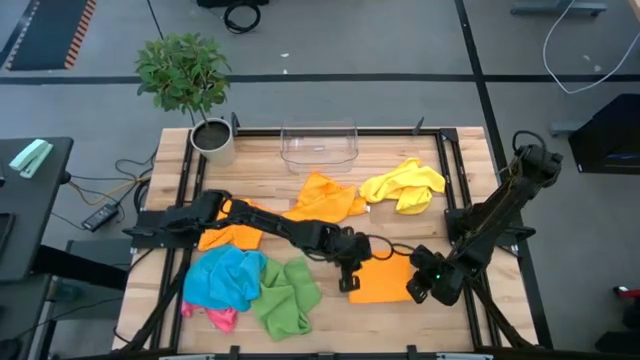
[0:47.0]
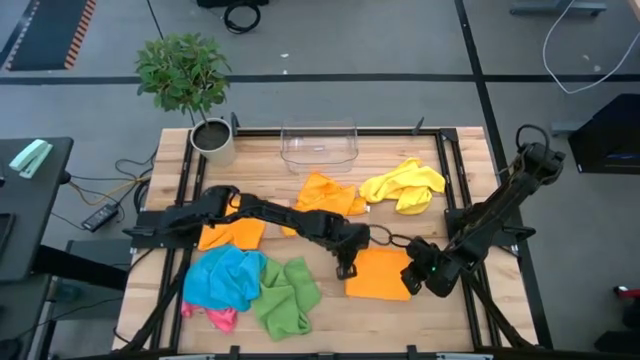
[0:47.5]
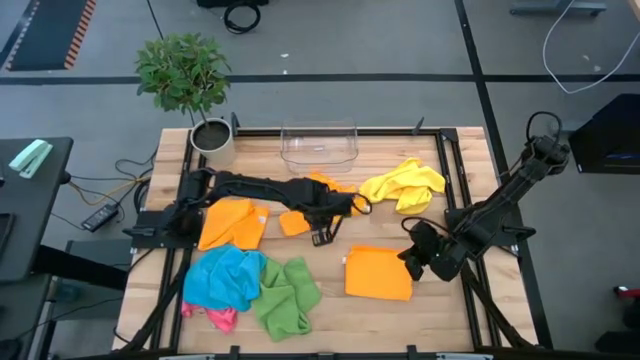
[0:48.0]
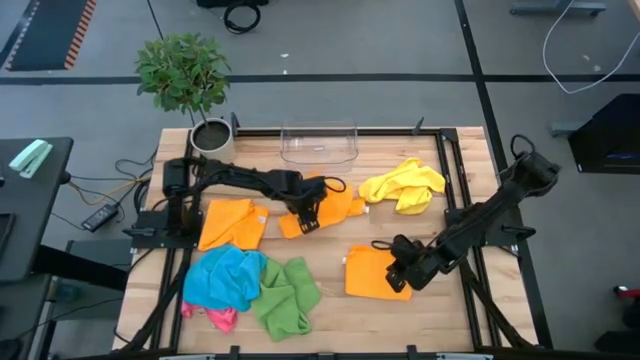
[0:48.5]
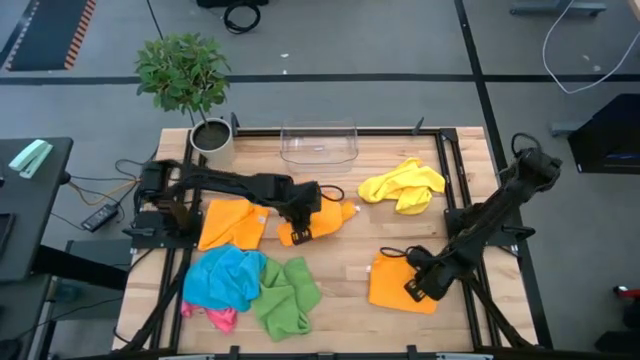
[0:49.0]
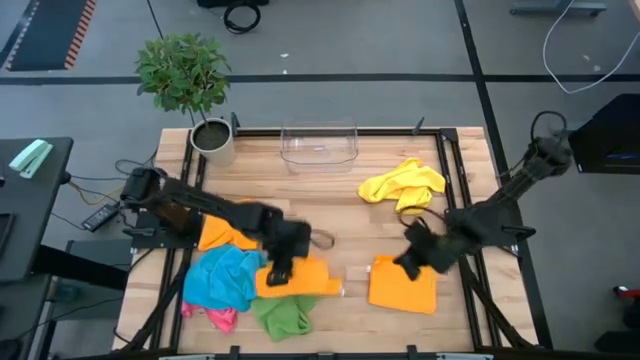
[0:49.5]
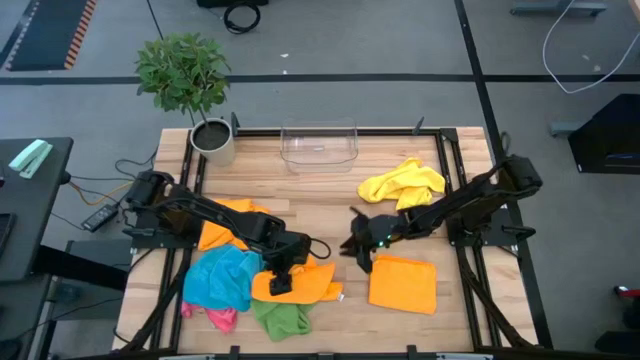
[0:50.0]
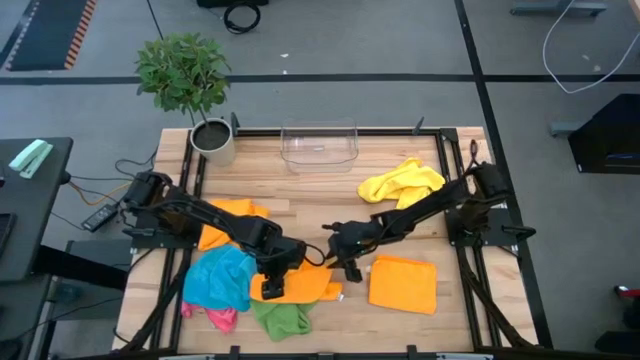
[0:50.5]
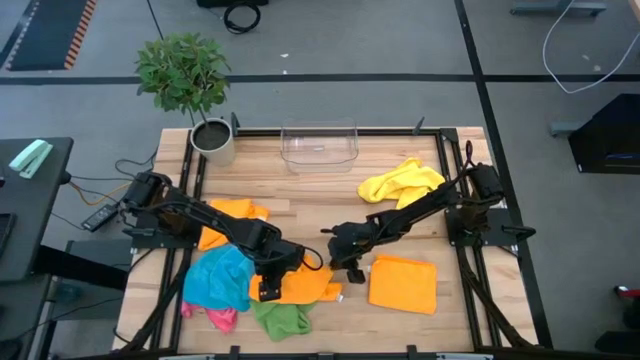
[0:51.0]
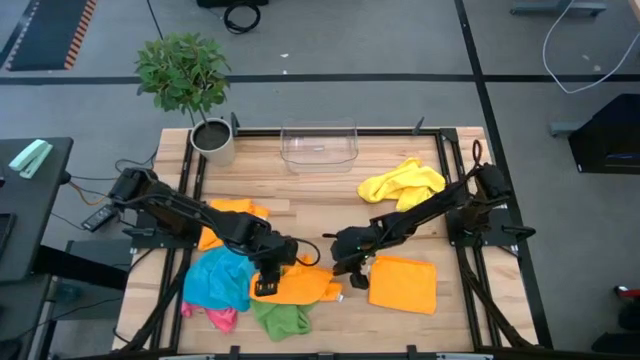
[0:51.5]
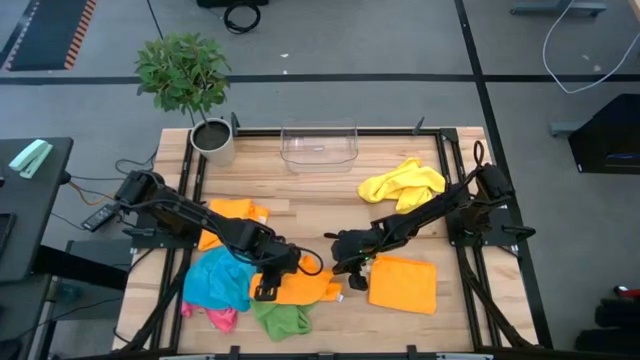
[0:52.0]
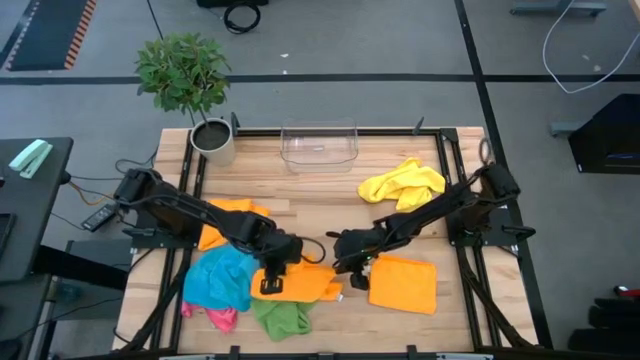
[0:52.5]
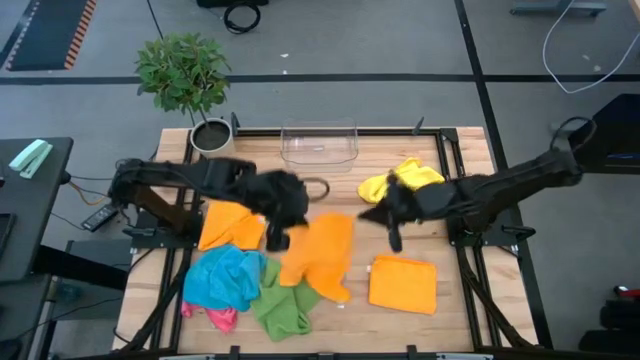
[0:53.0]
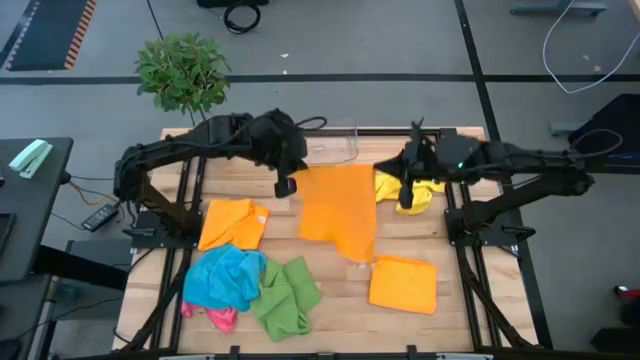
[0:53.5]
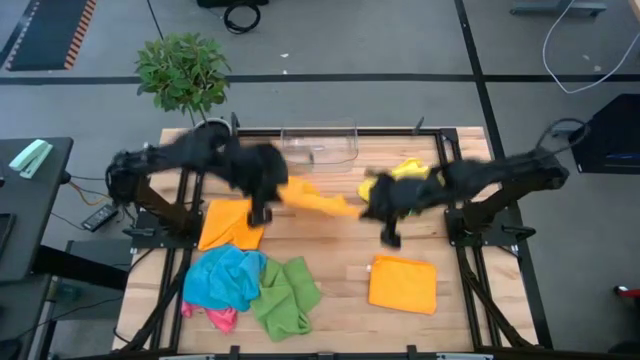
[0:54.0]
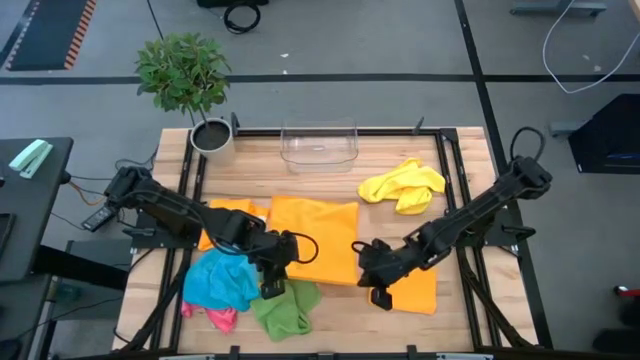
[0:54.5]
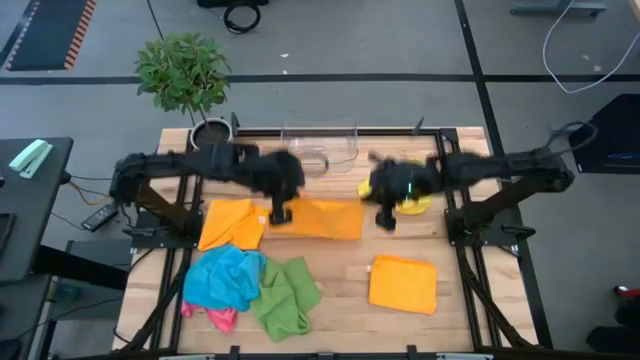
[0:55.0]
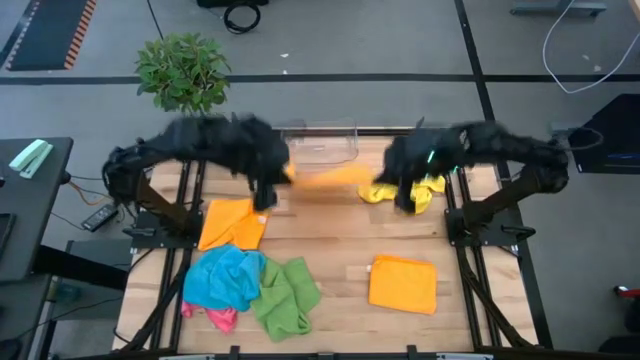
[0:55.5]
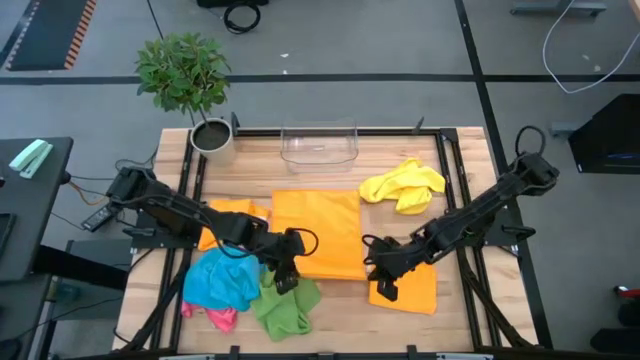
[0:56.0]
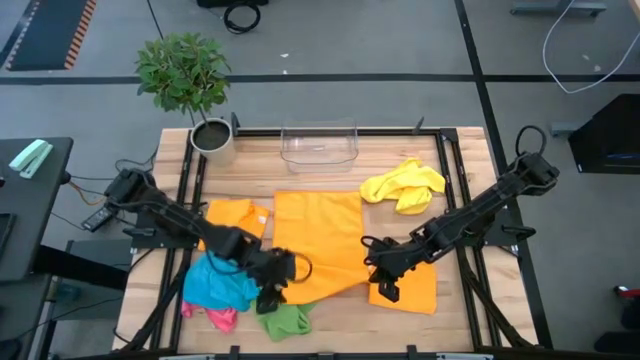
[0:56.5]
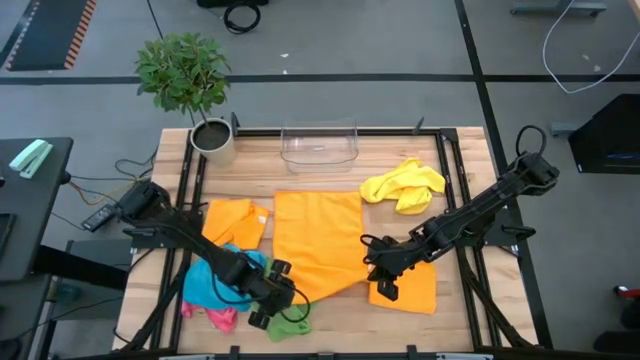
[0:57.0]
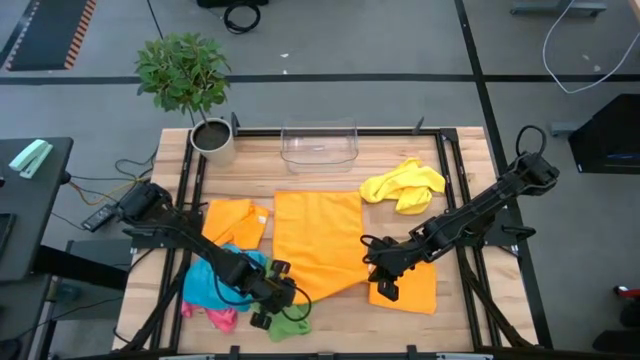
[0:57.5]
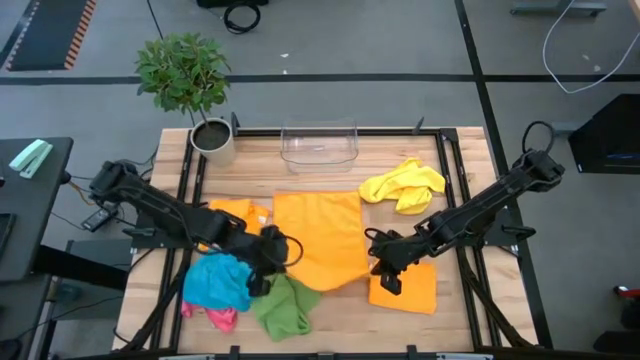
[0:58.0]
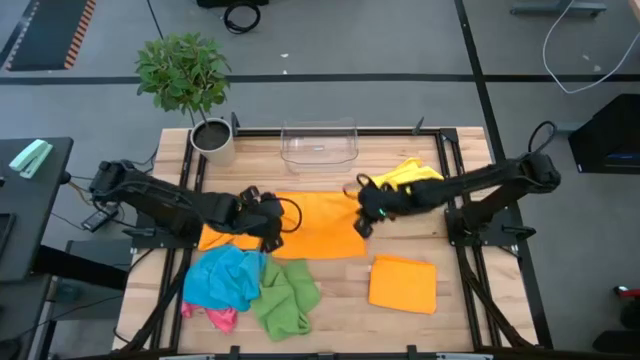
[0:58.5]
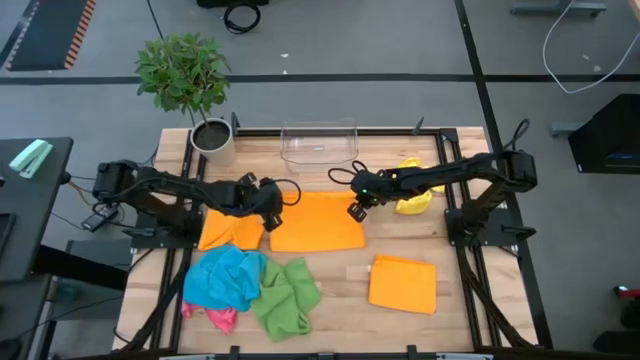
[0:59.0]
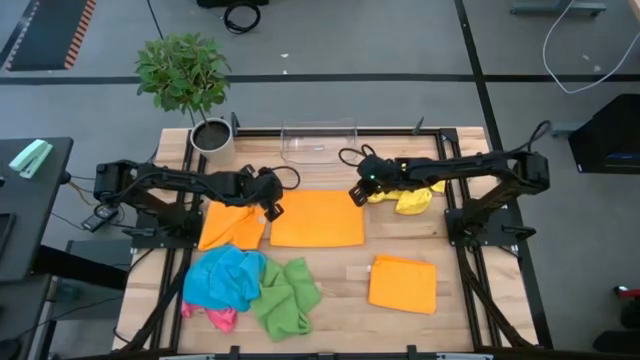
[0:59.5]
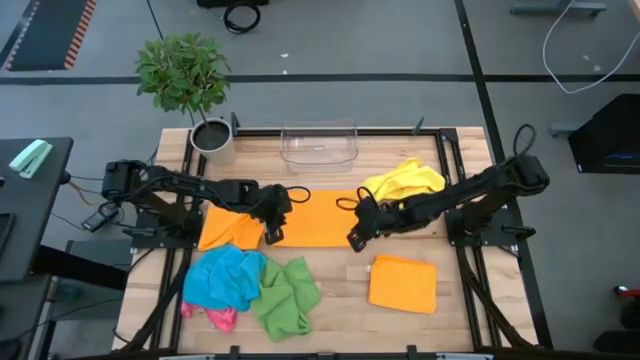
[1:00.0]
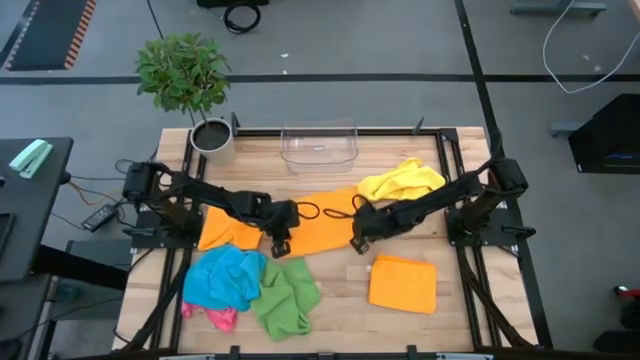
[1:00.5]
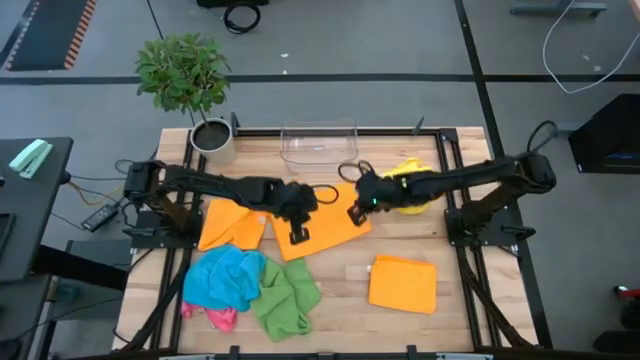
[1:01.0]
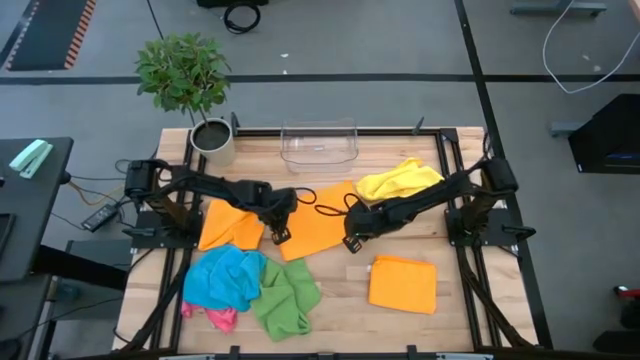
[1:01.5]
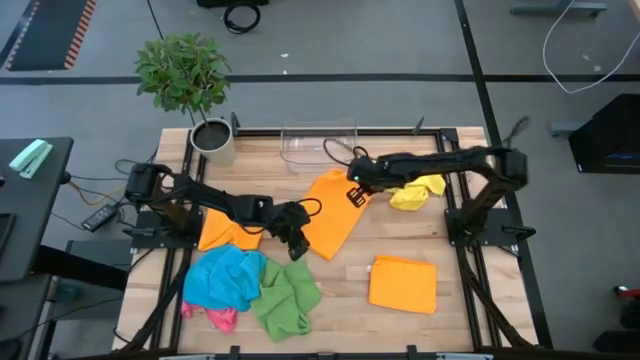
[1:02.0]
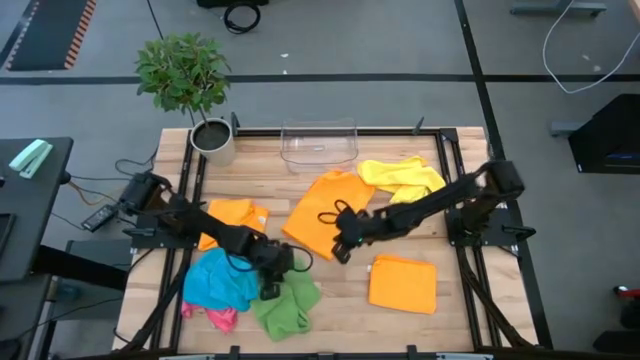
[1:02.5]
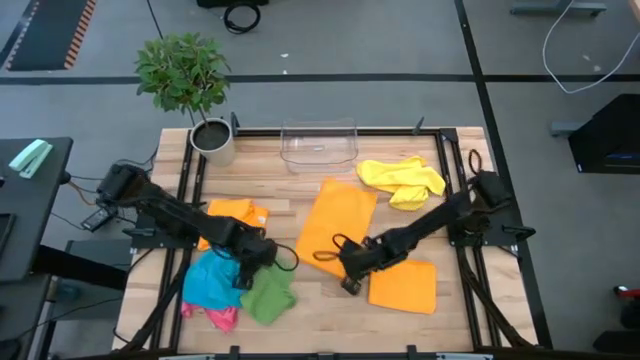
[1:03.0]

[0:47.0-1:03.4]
Task: Fold microfiber towels
Fold the middle orange towel on the table
